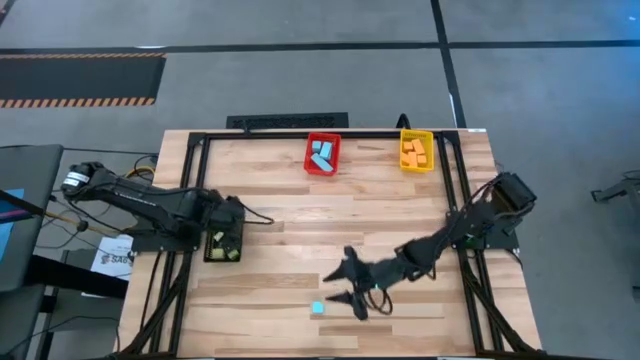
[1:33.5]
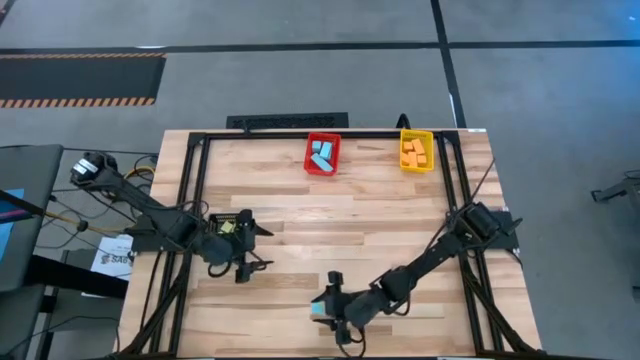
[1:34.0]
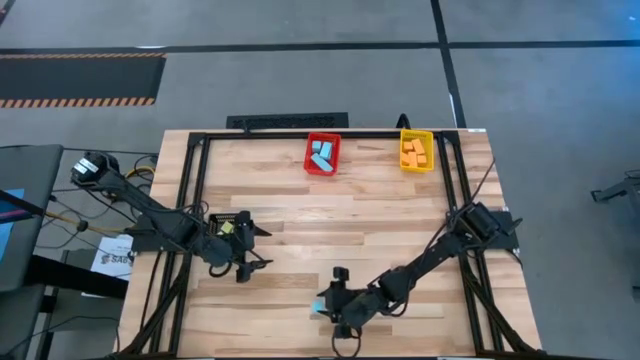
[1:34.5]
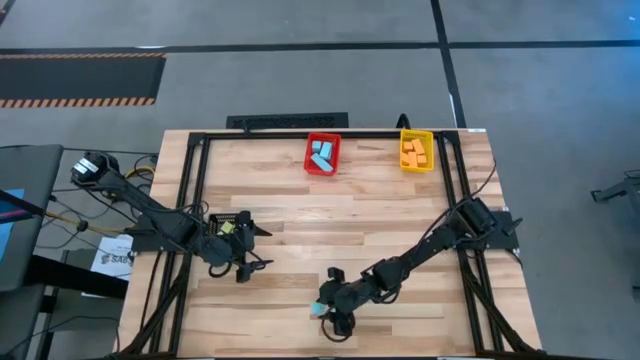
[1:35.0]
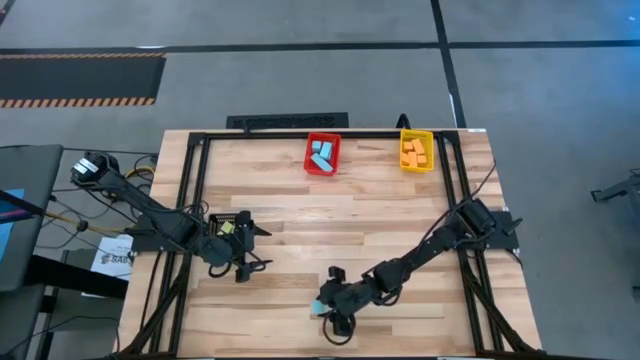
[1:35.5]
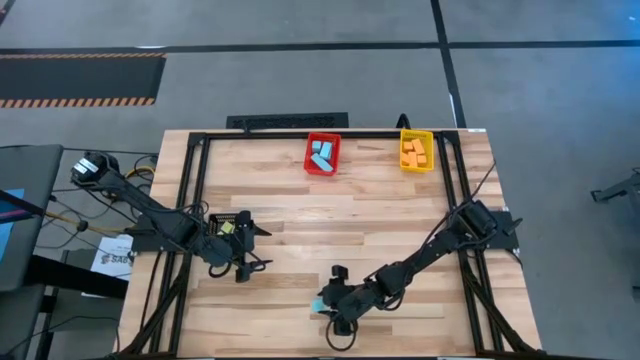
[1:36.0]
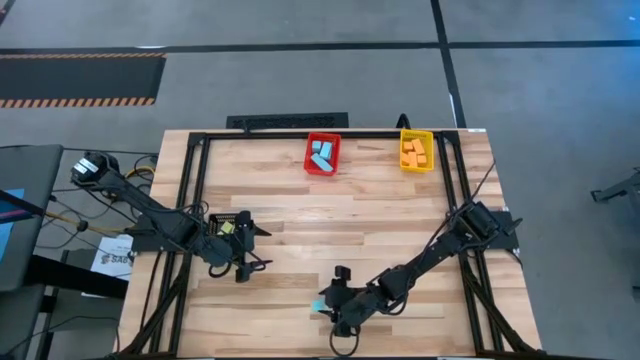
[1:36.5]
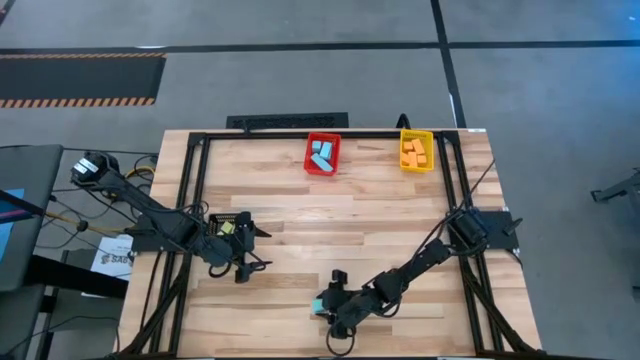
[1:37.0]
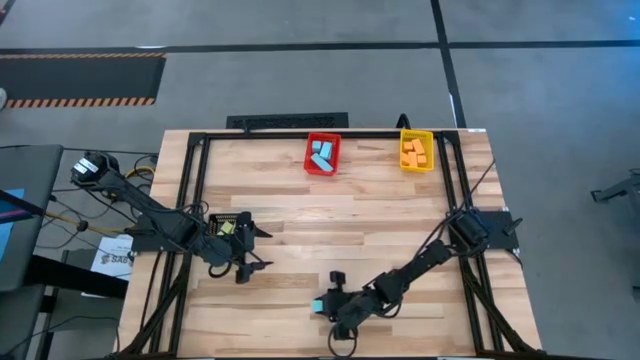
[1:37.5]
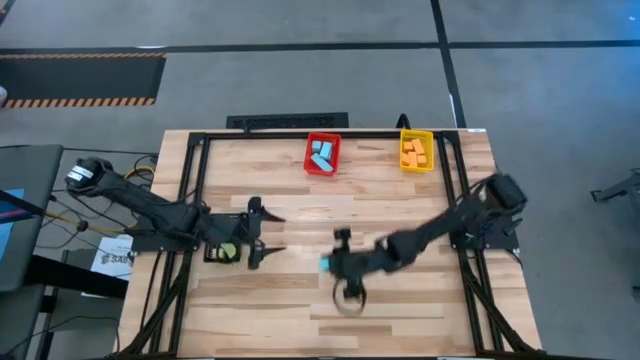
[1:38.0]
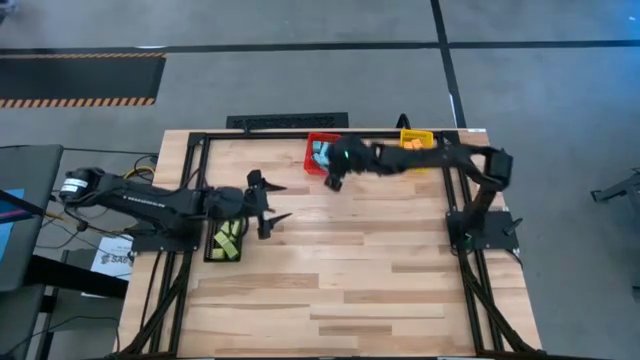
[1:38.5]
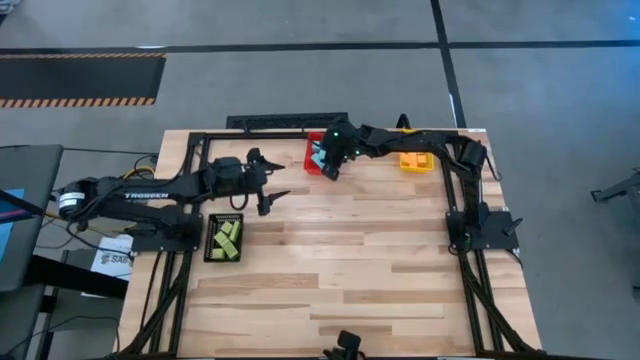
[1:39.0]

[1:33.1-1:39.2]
Task: Sort & place blocks by color
Put the blue block into the red bin

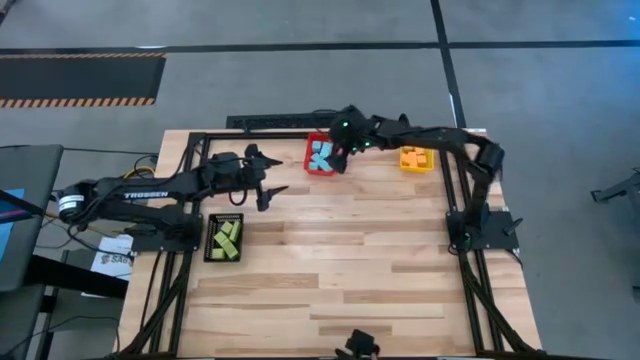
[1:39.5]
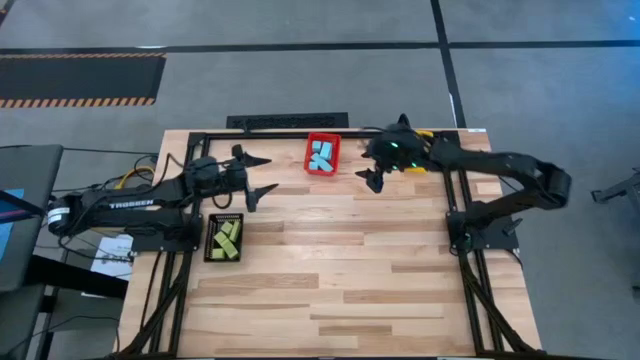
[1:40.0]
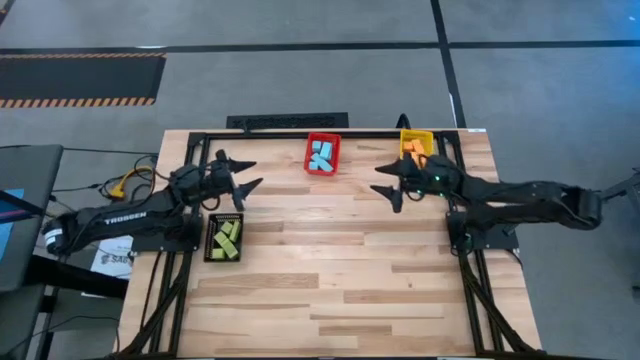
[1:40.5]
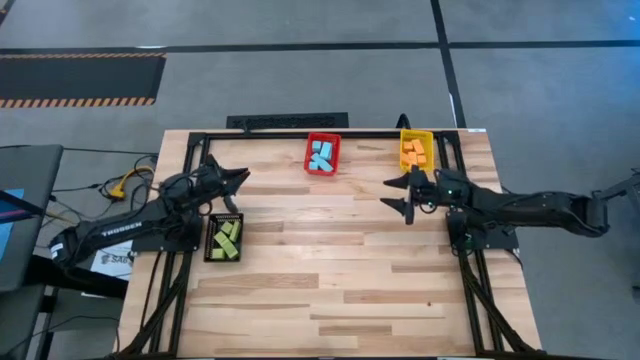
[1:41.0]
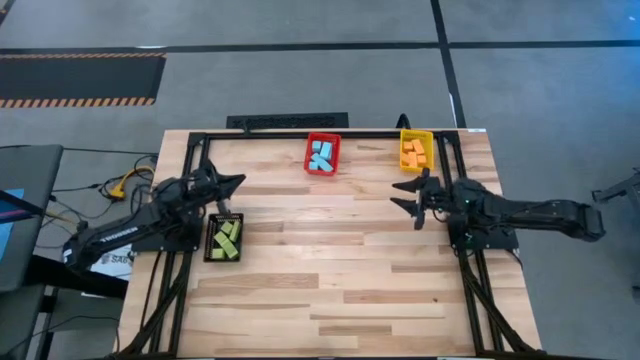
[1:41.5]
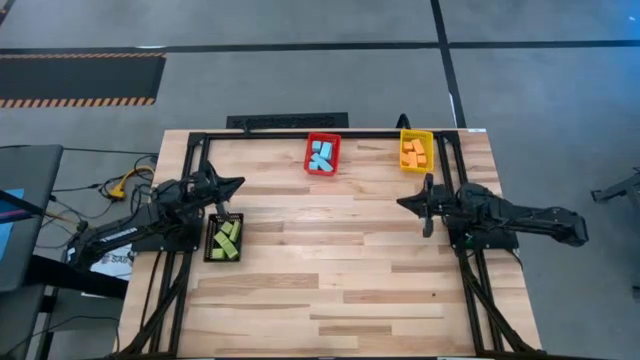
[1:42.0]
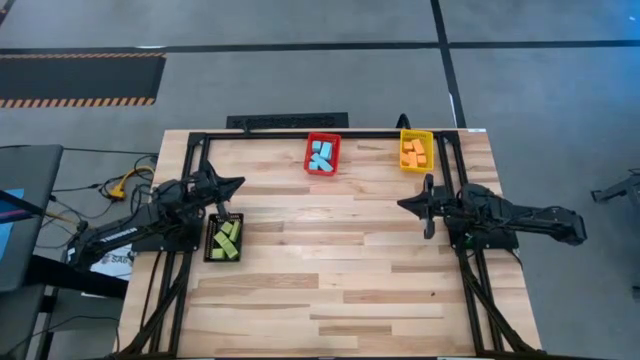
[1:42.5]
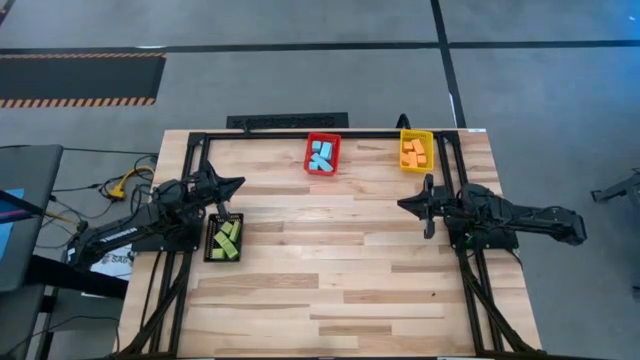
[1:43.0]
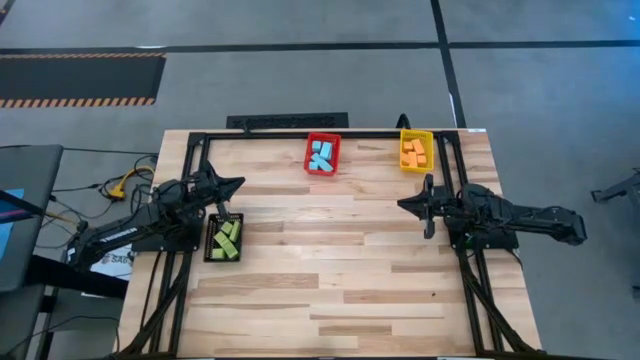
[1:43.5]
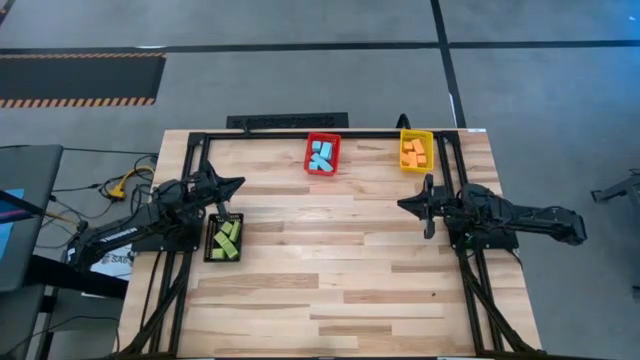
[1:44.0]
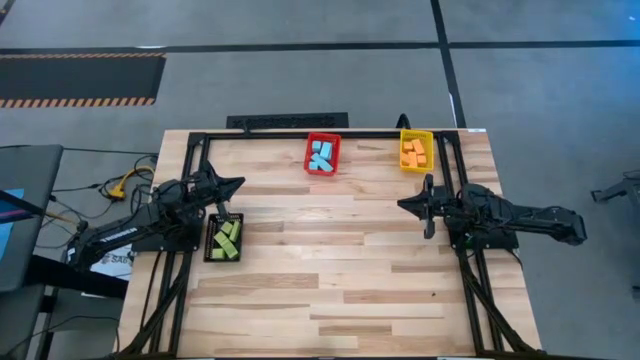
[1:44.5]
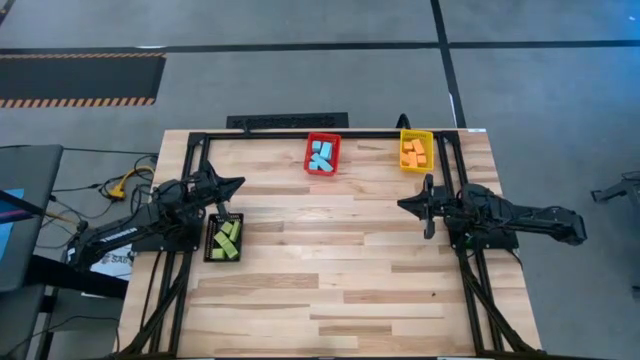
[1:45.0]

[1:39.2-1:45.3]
Return to Home Position

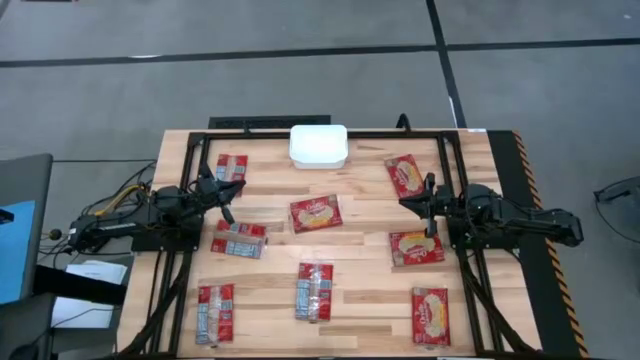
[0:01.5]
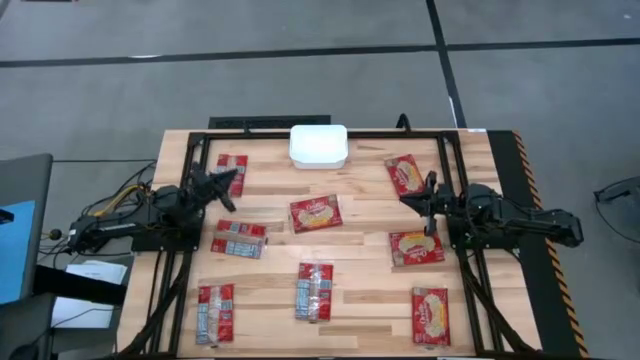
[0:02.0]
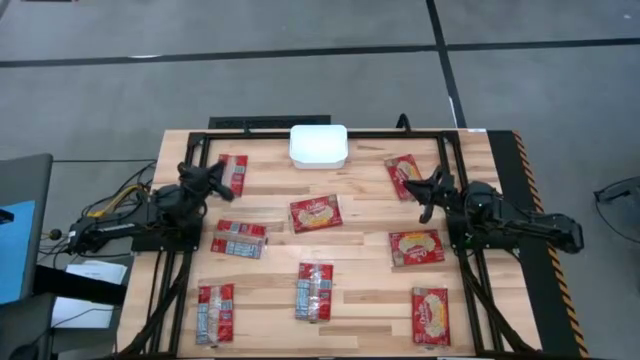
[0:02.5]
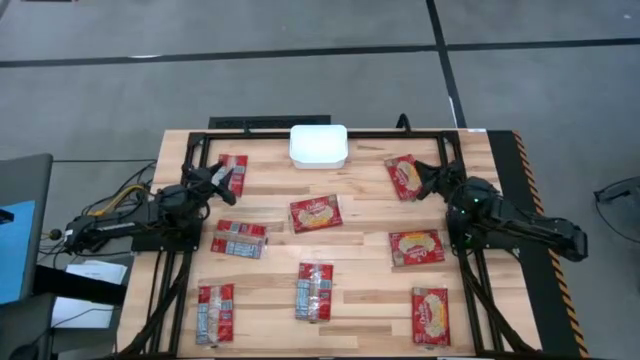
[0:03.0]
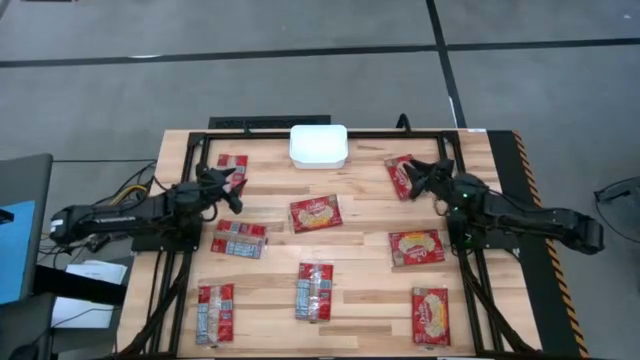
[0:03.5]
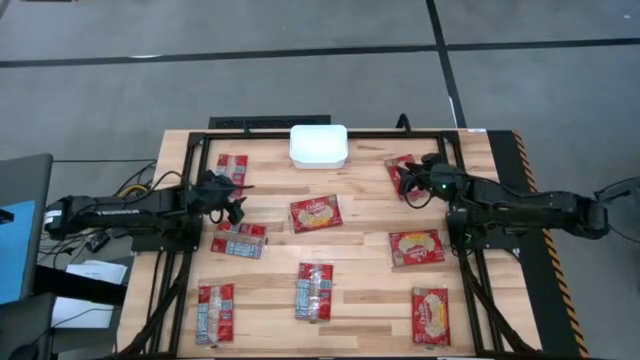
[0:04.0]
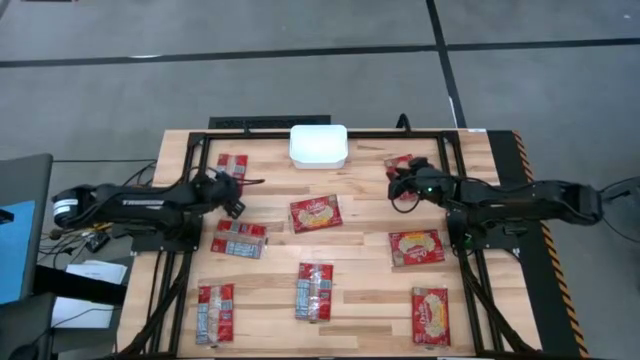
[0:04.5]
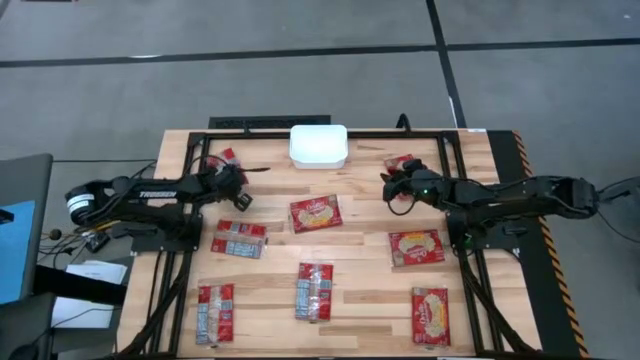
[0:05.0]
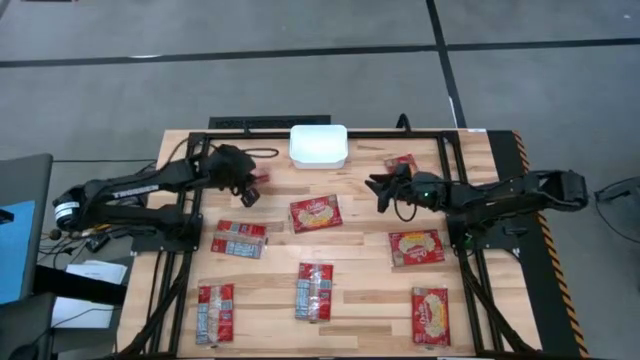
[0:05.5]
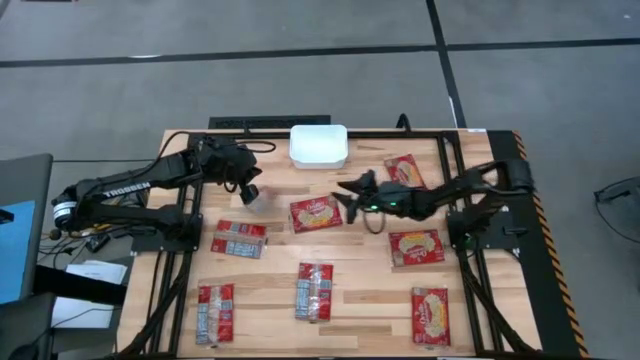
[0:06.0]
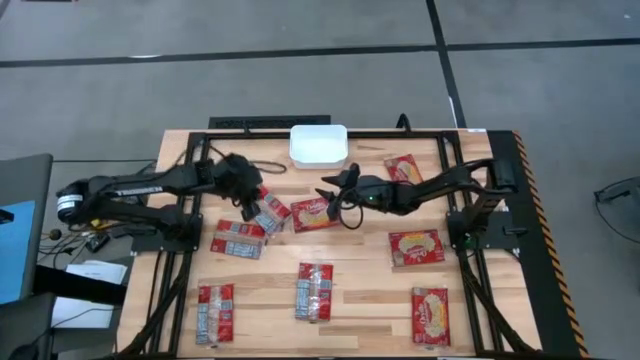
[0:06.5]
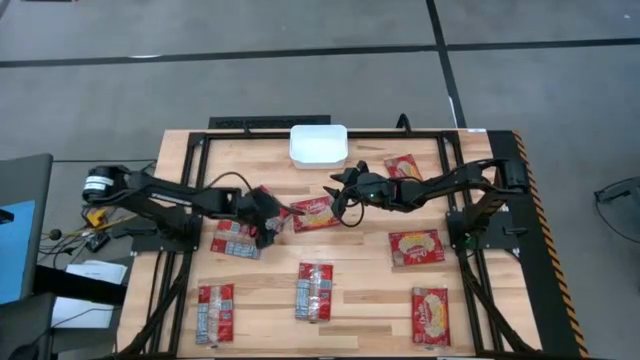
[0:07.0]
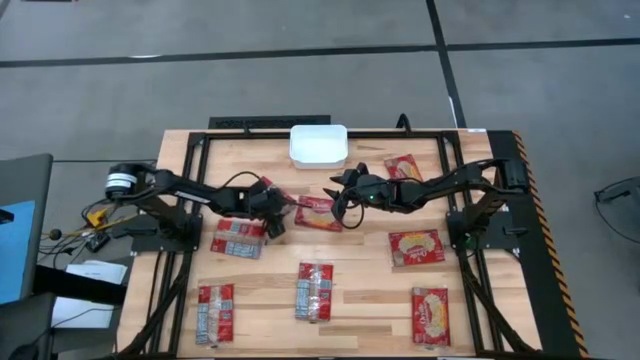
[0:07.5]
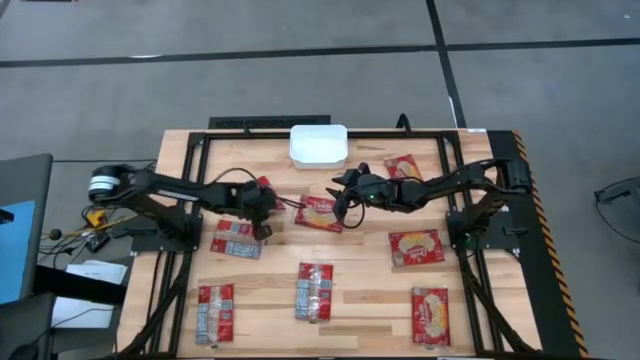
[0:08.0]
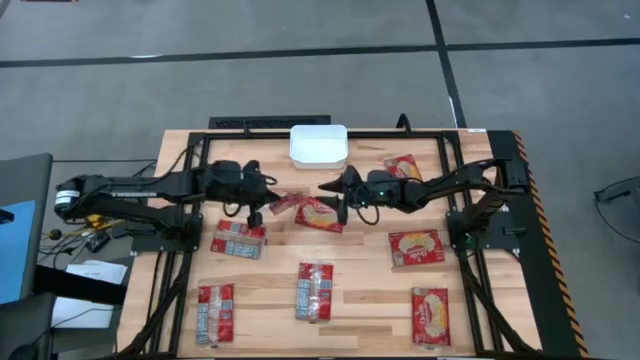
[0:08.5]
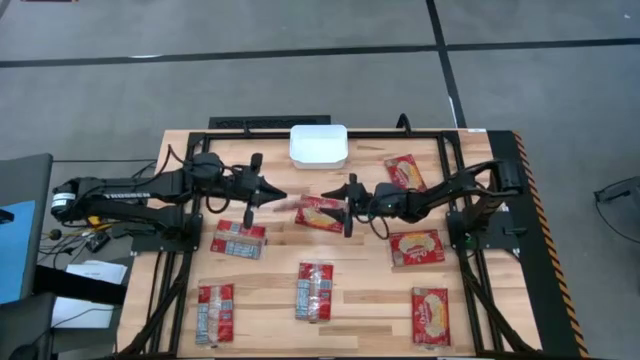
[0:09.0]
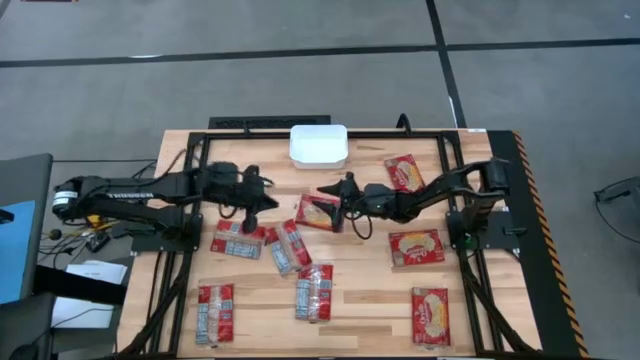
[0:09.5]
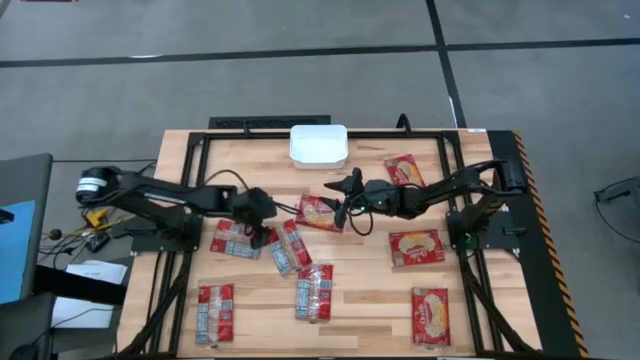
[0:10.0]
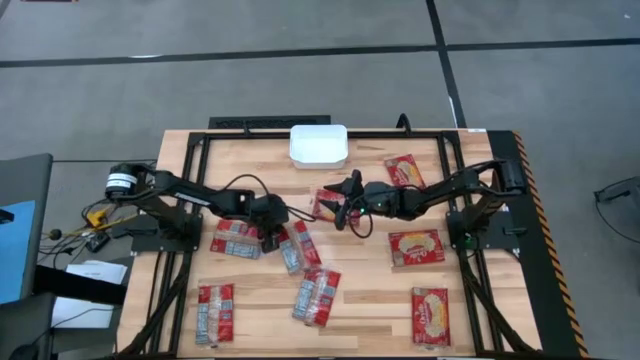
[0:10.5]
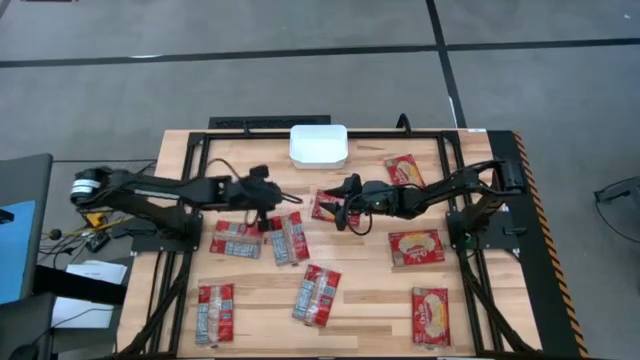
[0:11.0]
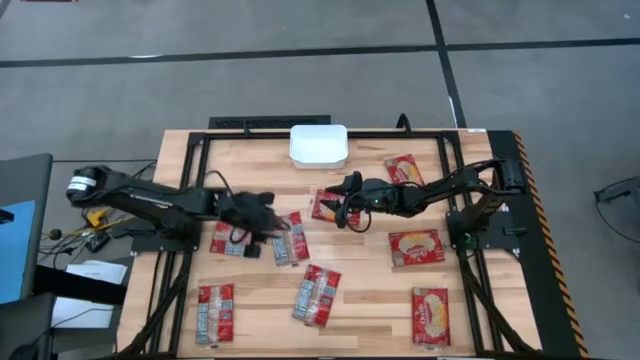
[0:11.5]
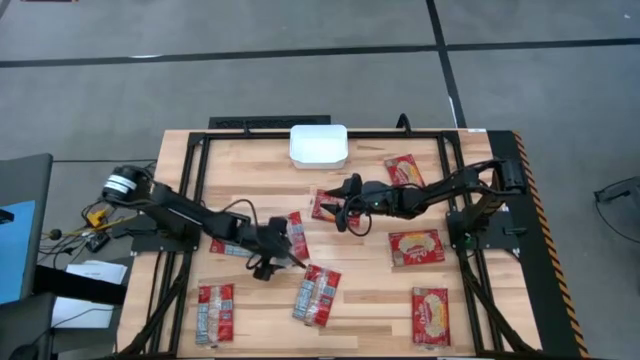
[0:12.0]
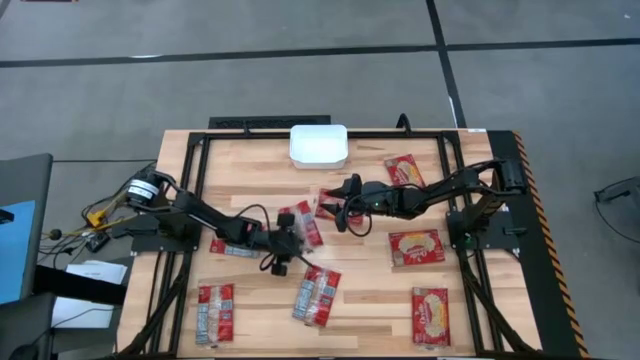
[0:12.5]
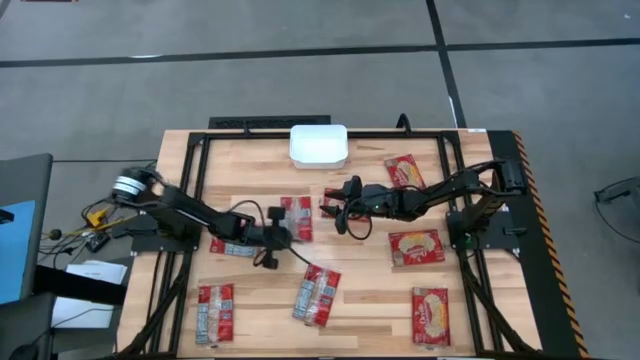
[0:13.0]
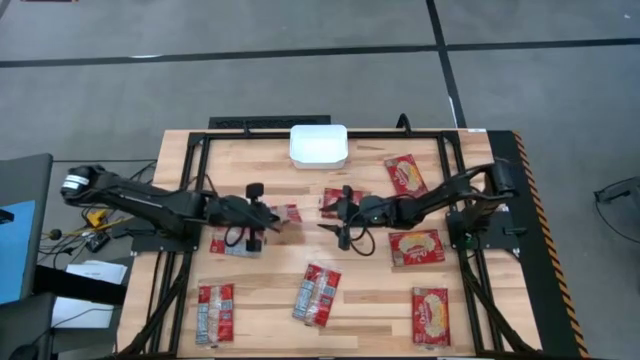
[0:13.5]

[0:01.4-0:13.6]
Task: Sort popcorn bags into baskets
Put the red popcorn bag into the white bin
